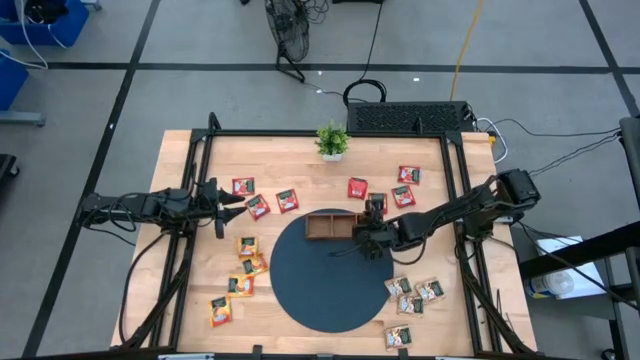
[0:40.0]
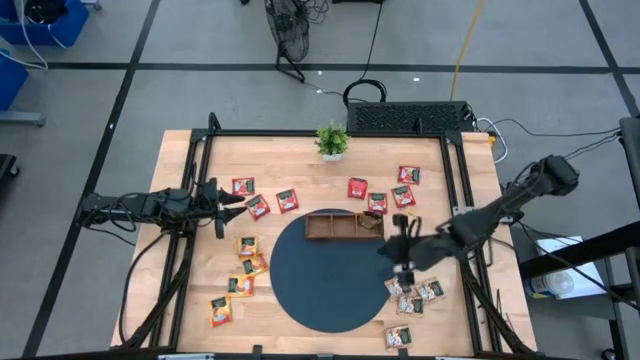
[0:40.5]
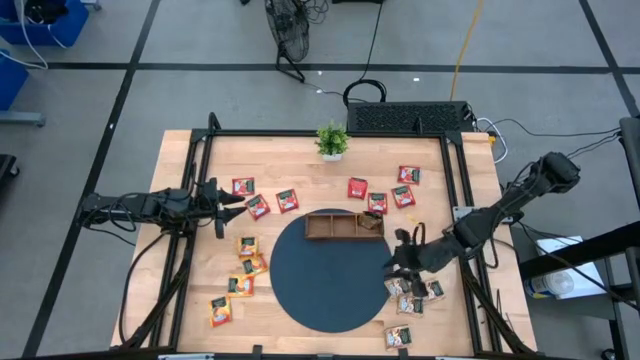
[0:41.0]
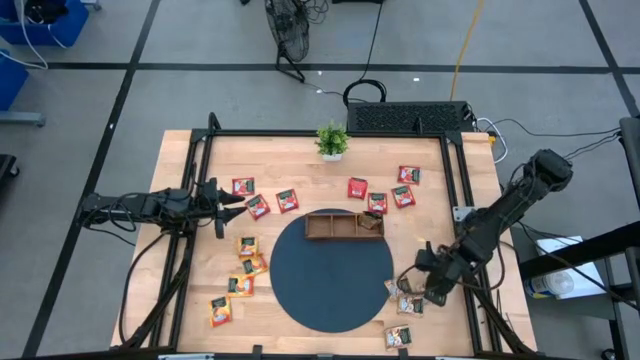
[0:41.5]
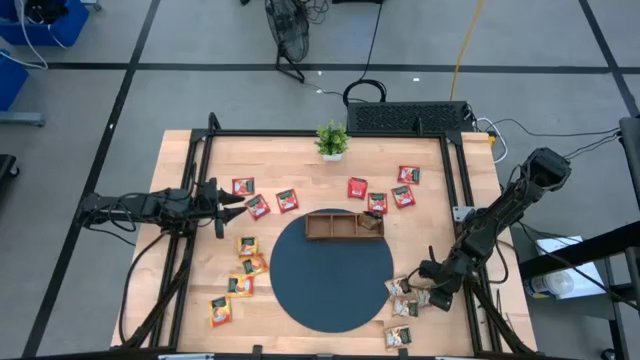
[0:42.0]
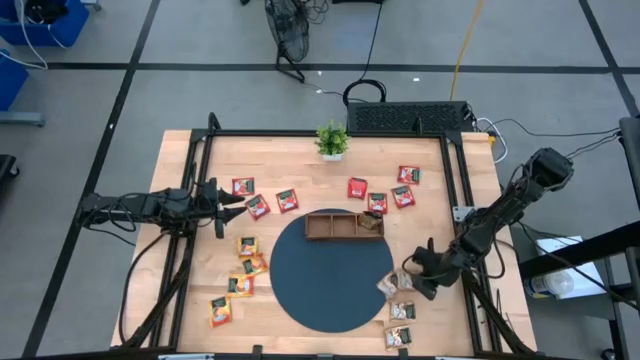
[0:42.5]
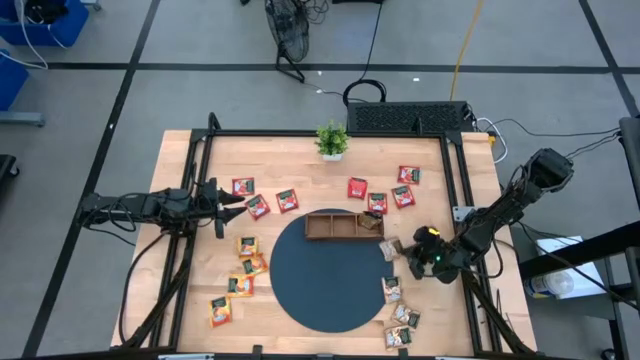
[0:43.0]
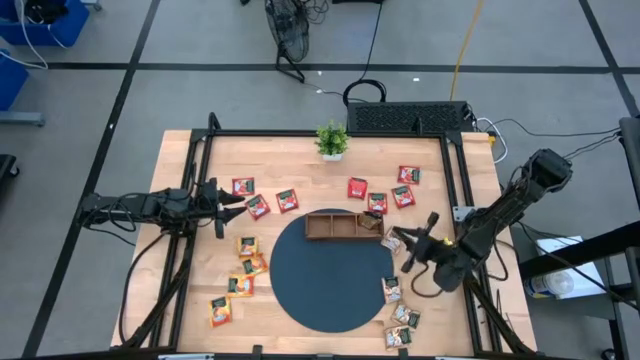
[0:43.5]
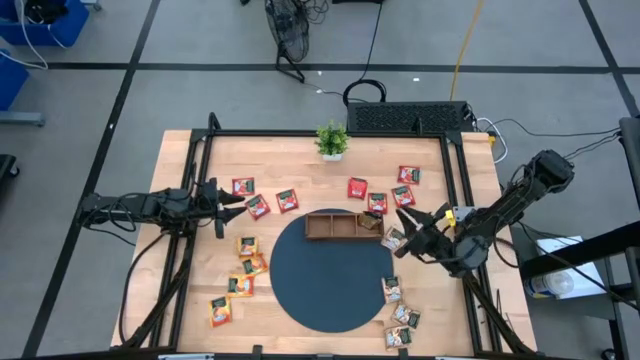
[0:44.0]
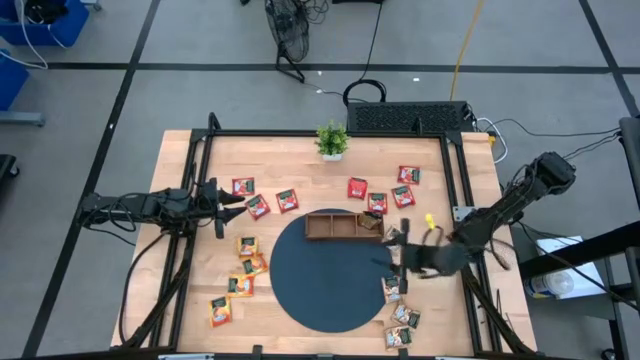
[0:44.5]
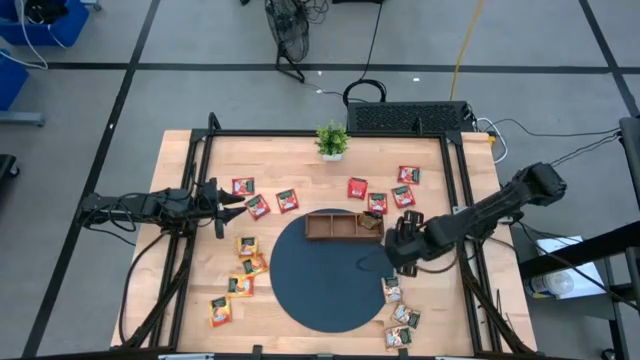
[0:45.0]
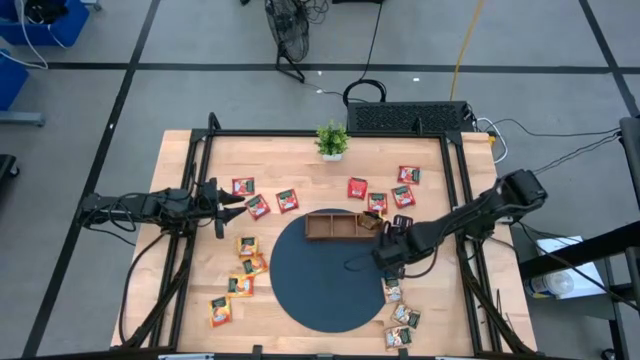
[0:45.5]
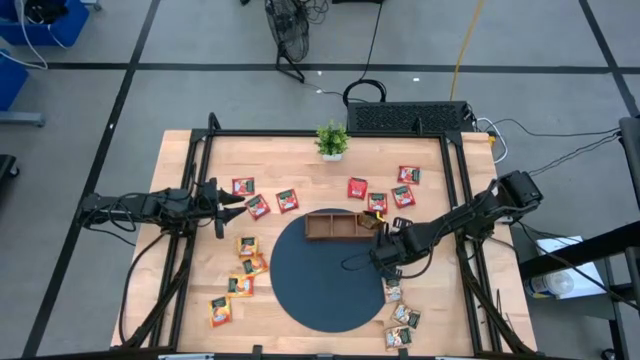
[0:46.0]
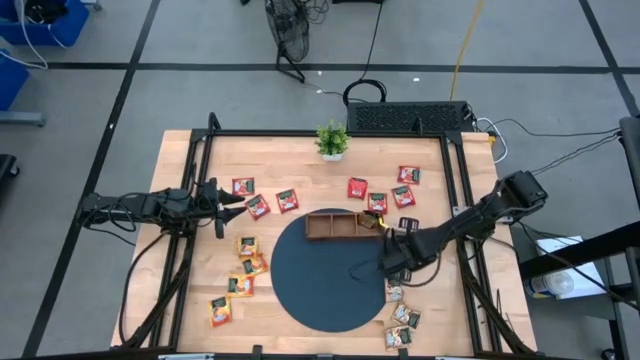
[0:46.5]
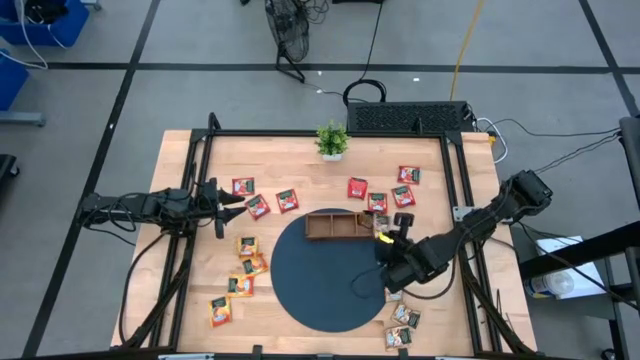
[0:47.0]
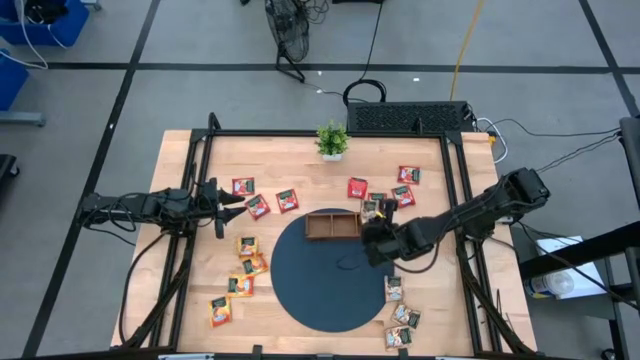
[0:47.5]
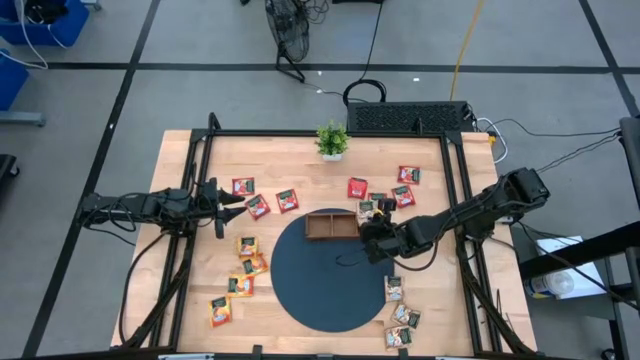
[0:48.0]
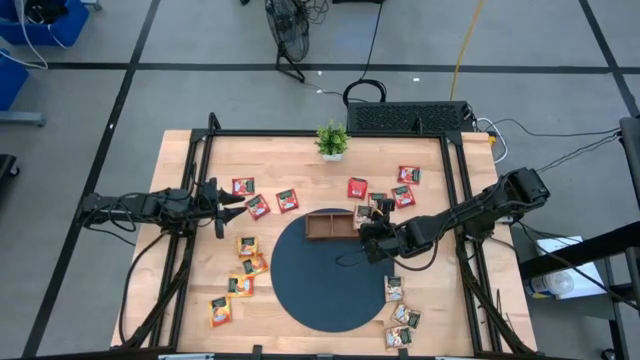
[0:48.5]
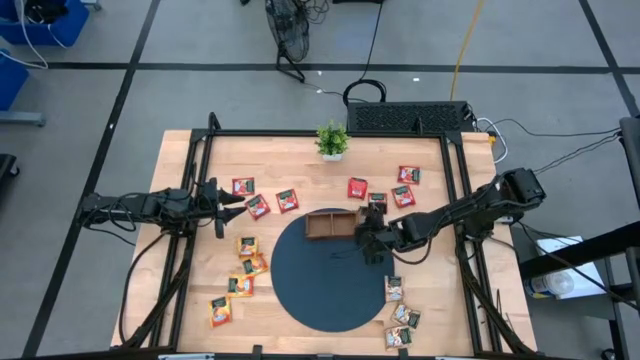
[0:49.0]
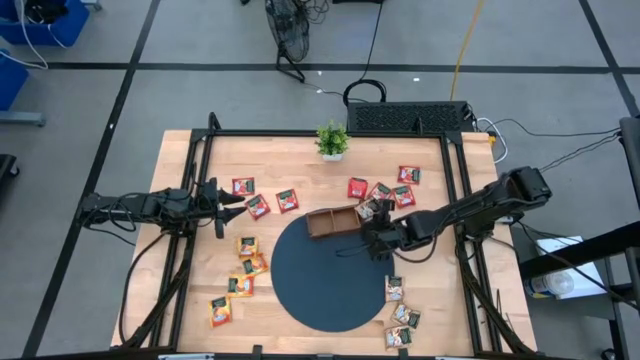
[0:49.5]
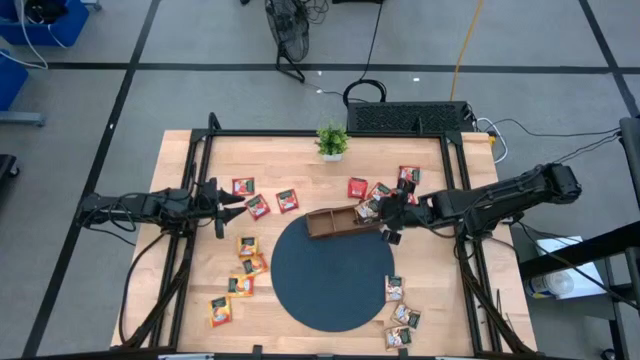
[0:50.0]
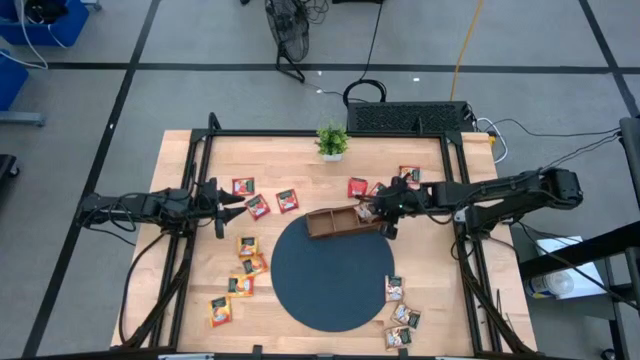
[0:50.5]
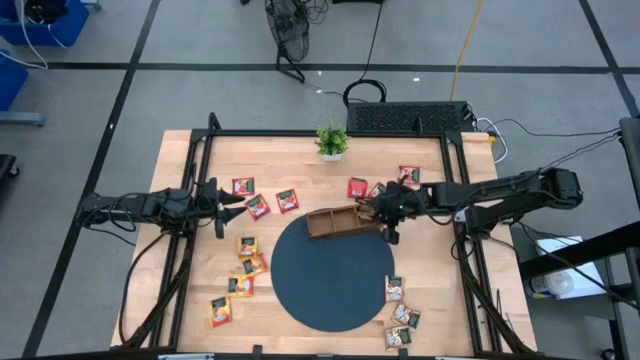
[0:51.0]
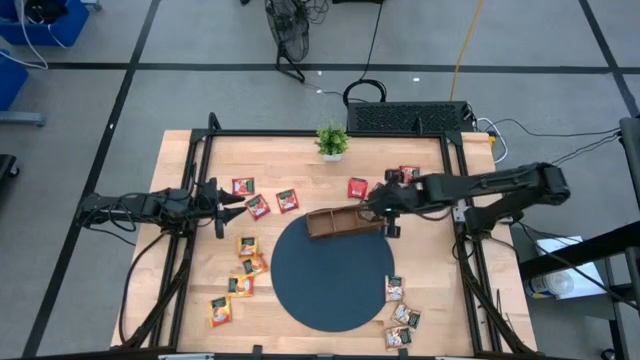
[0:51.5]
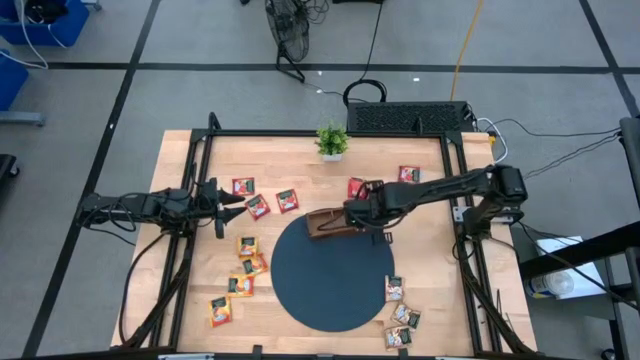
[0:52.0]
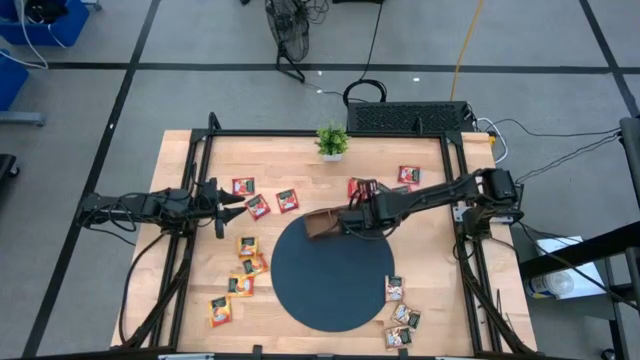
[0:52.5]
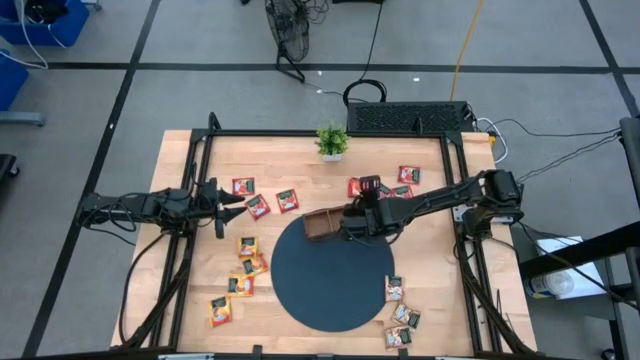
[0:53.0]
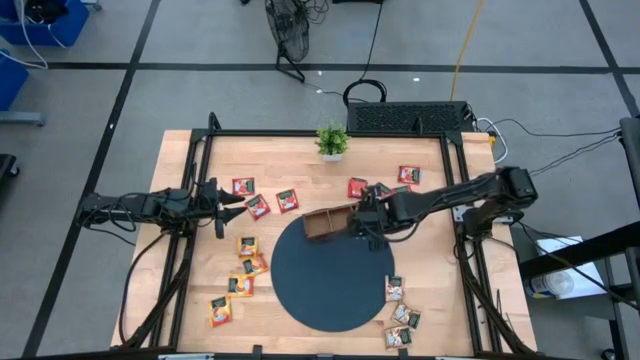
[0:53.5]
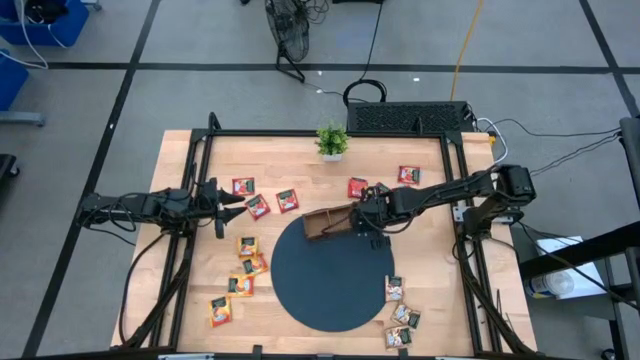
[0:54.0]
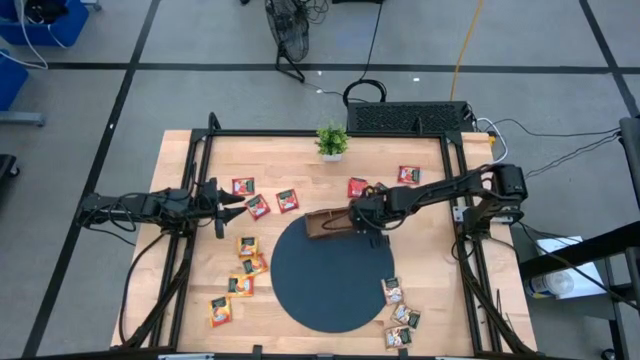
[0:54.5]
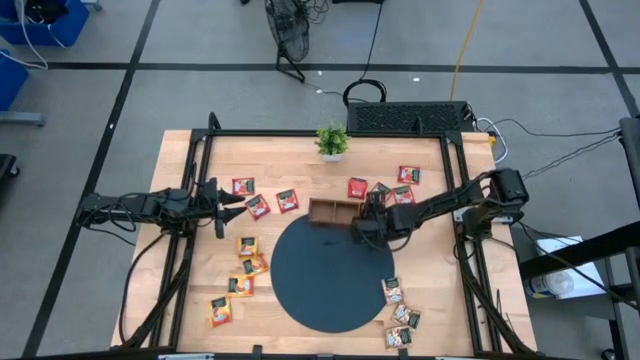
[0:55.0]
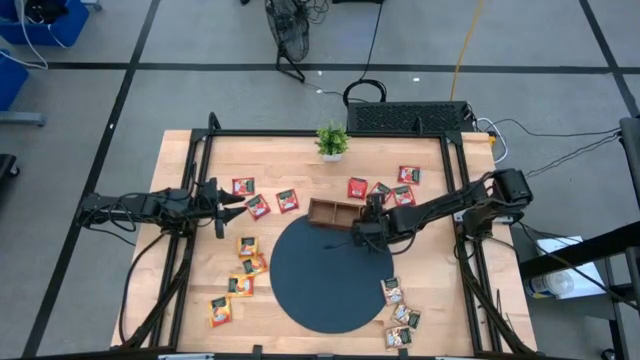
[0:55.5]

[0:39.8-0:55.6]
Task: Pick & Place Tea
Put the brown tea bag into the right slot of the wooden organizer

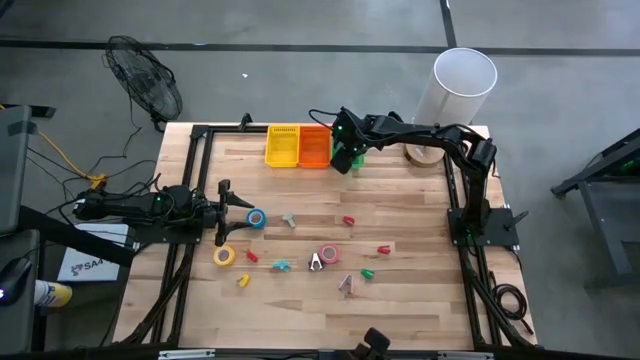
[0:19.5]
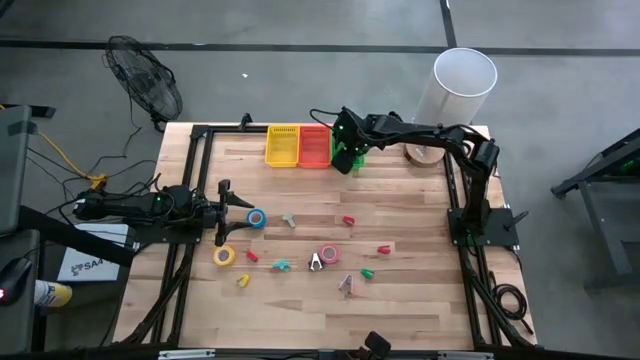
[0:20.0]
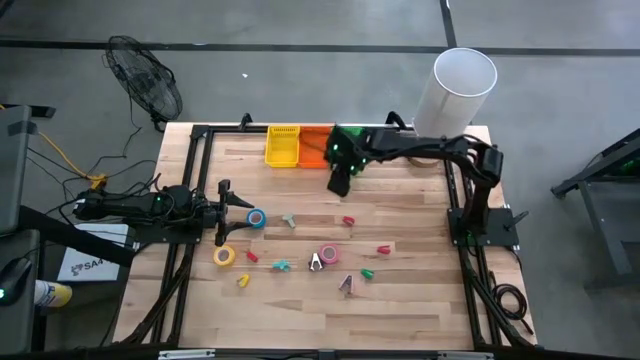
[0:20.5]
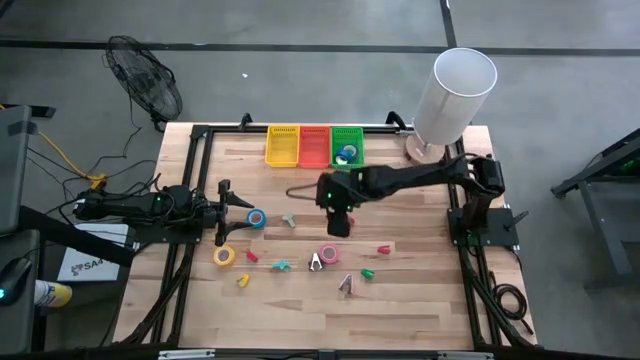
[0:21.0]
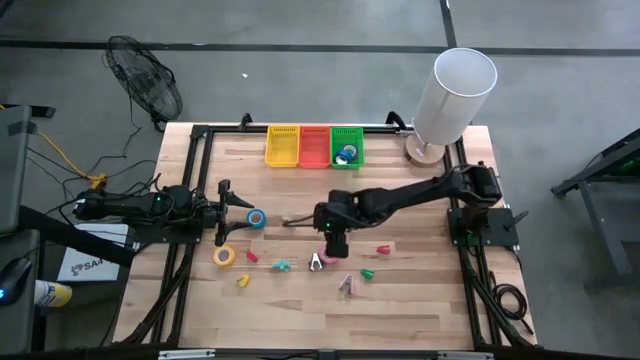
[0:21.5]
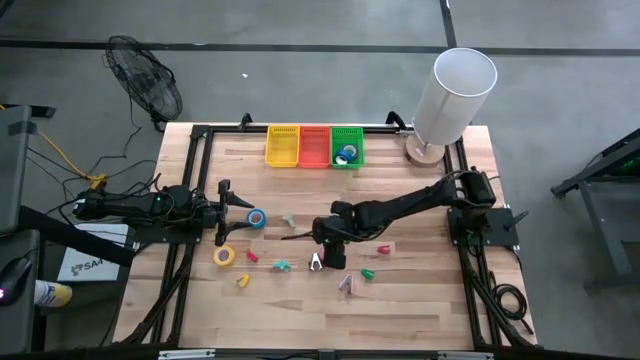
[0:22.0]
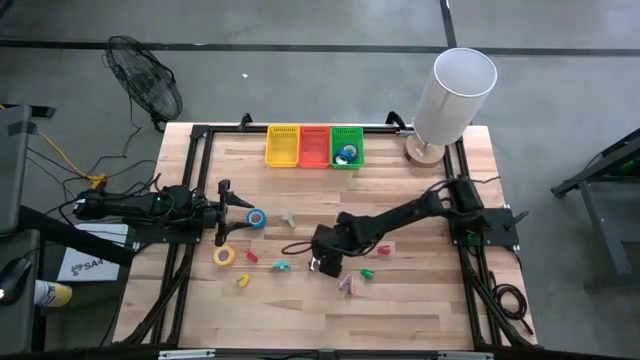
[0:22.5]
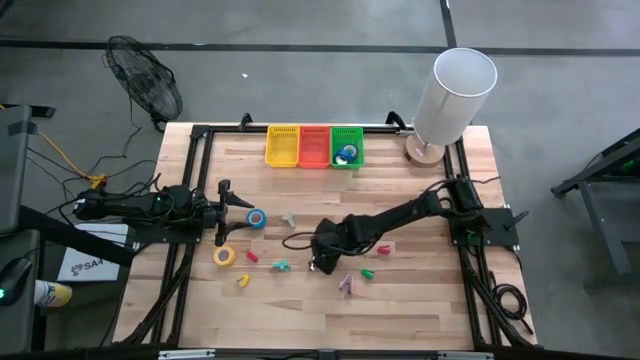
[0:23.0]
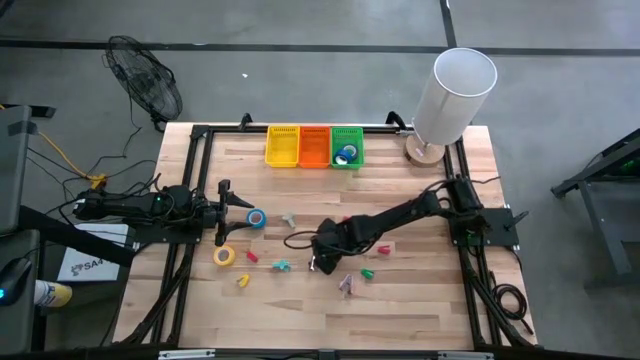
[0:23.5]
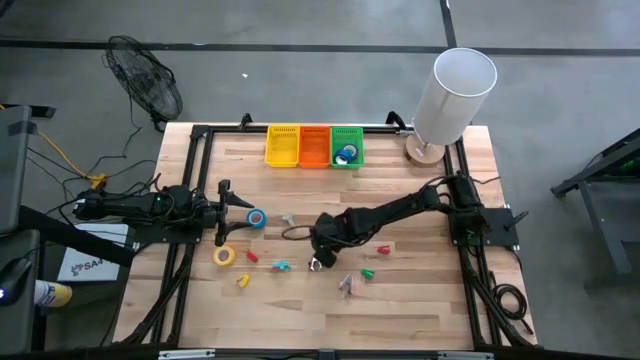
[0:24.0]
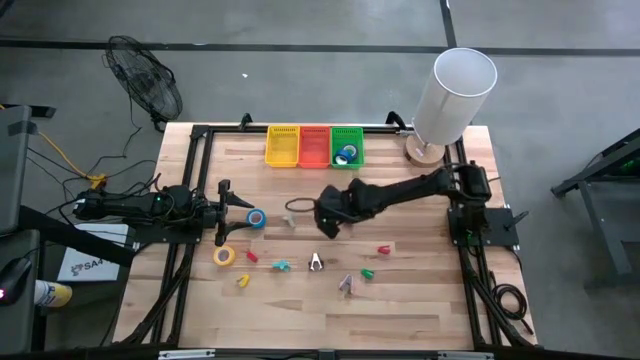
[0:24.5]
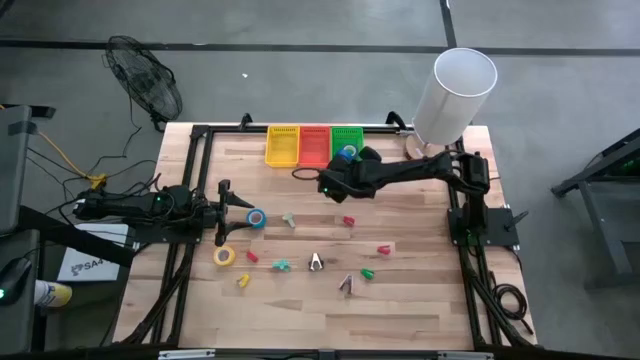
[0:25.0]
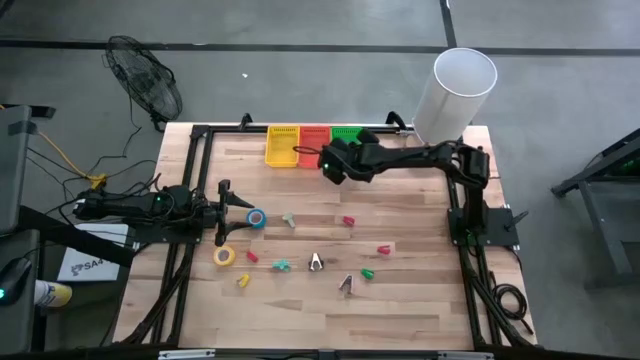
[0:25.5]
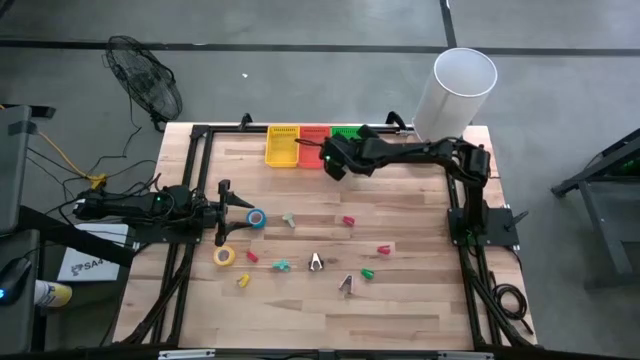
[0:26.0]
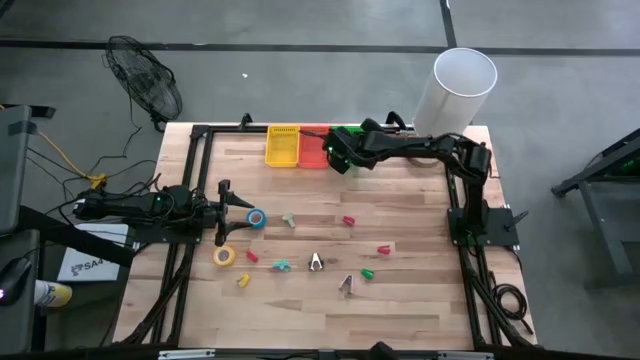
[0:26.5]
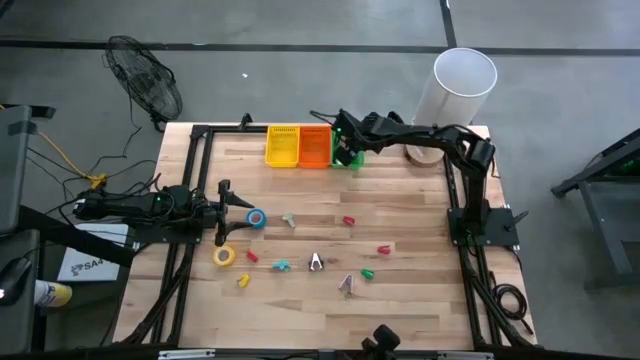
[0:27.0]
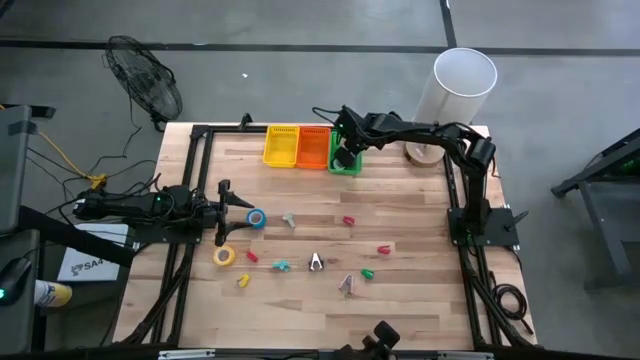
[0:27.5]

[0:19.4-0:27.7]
Task: Pick and place Stapler, Stapler remover, tape
Put the pink tape into the green basket
